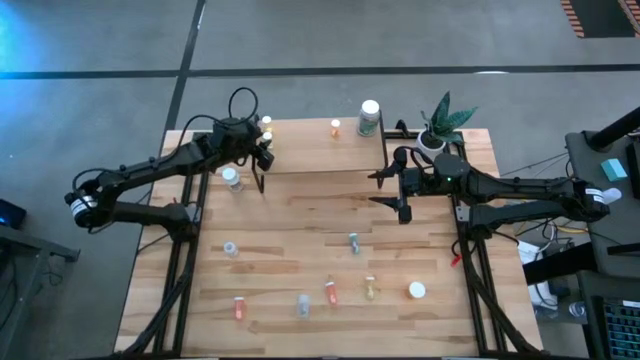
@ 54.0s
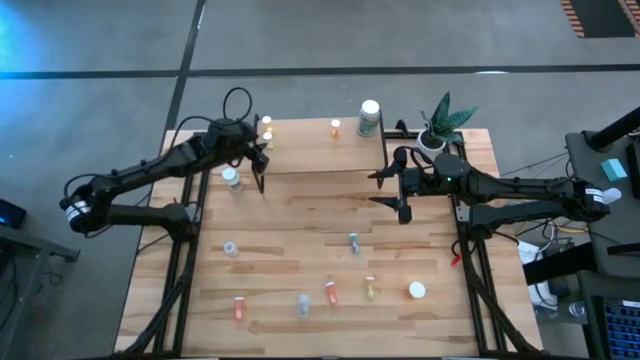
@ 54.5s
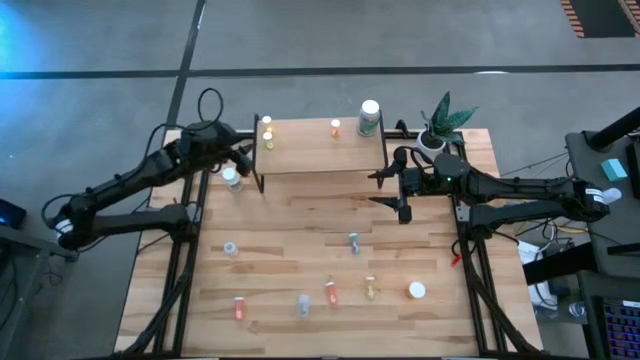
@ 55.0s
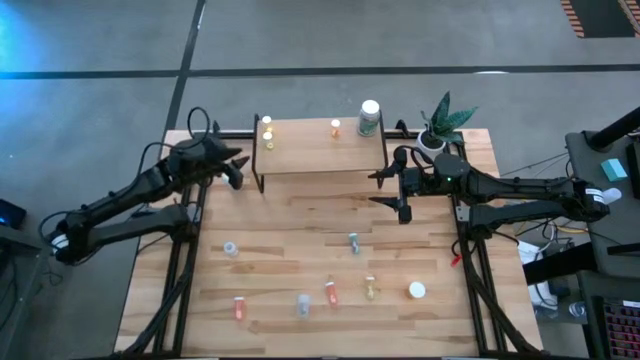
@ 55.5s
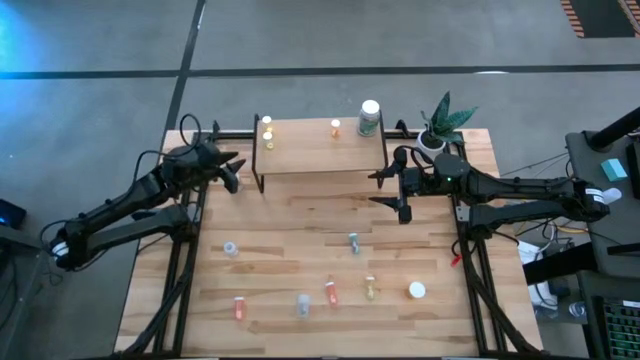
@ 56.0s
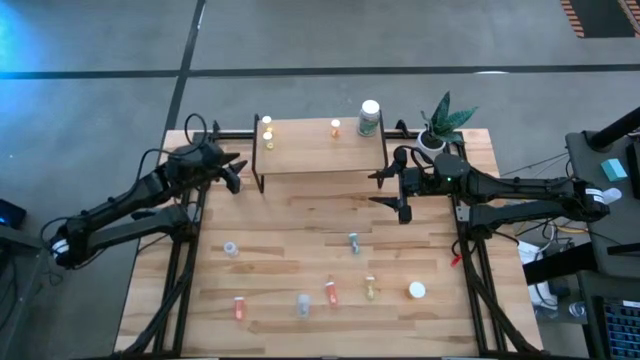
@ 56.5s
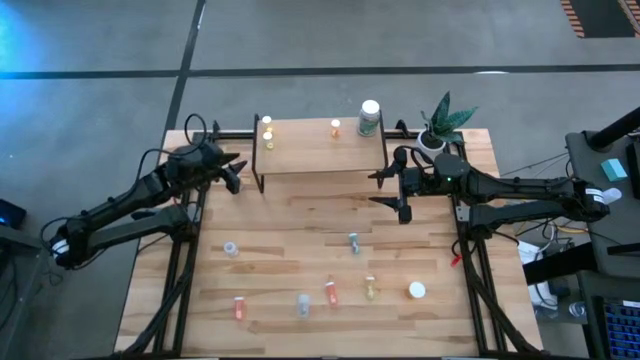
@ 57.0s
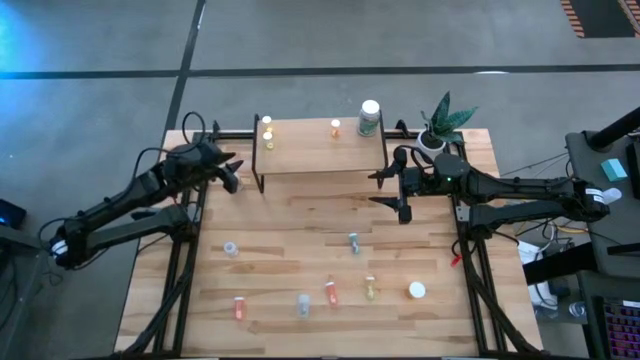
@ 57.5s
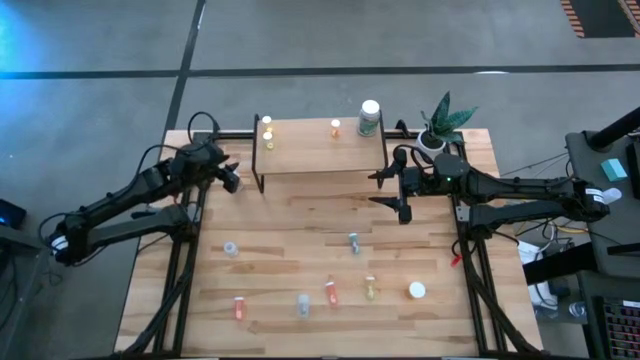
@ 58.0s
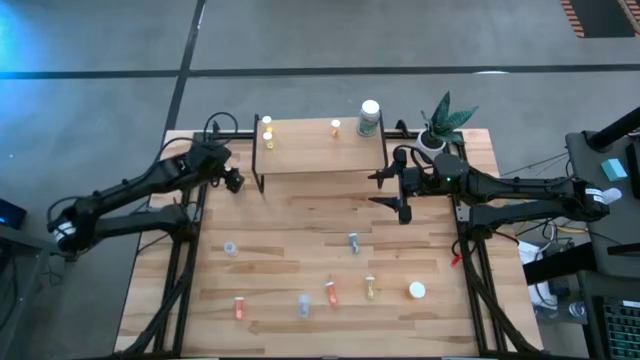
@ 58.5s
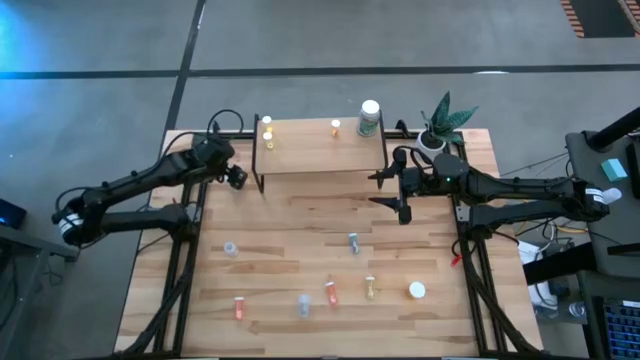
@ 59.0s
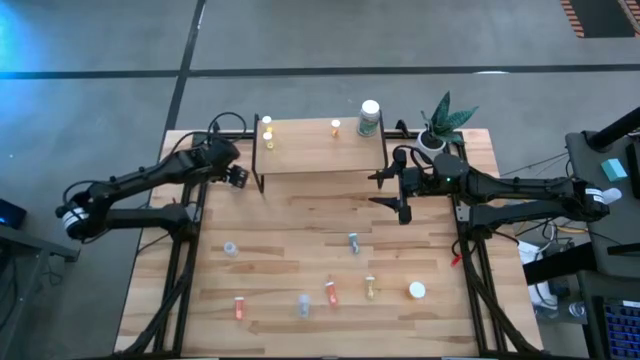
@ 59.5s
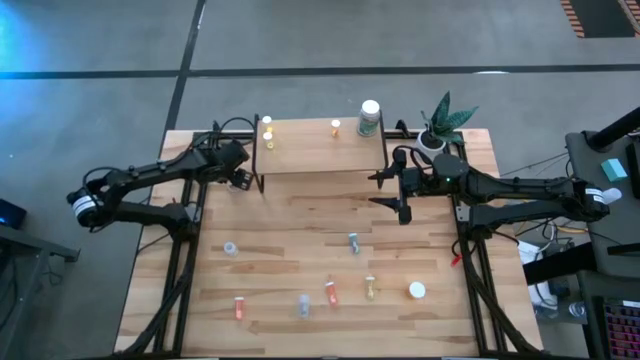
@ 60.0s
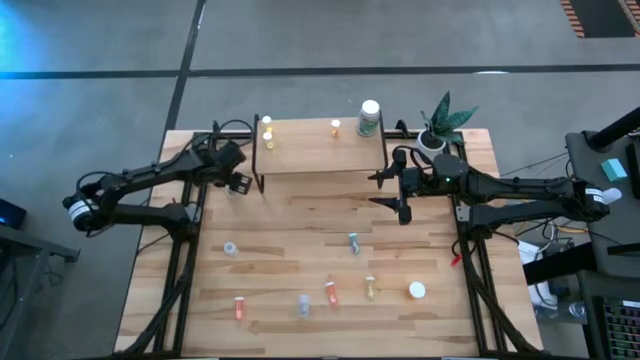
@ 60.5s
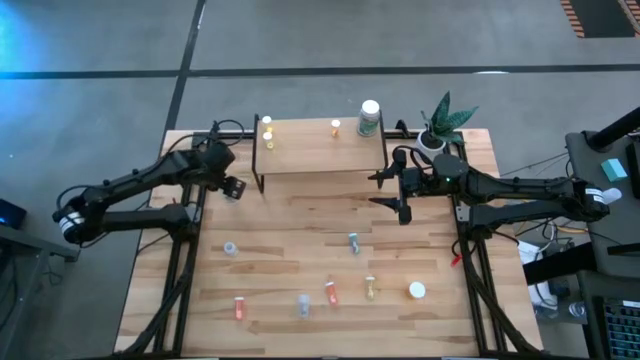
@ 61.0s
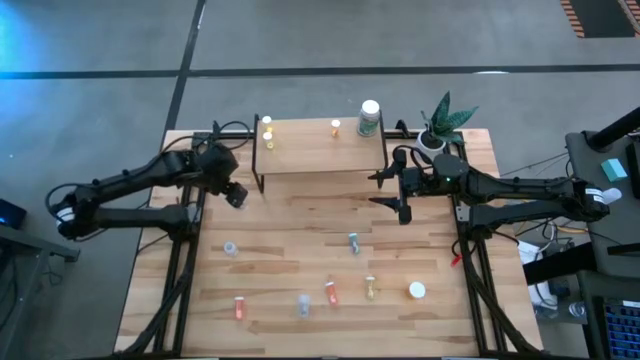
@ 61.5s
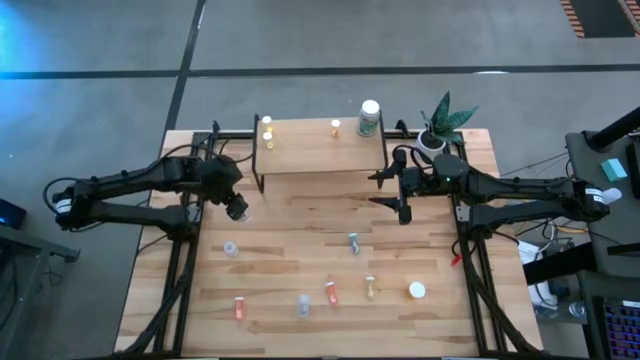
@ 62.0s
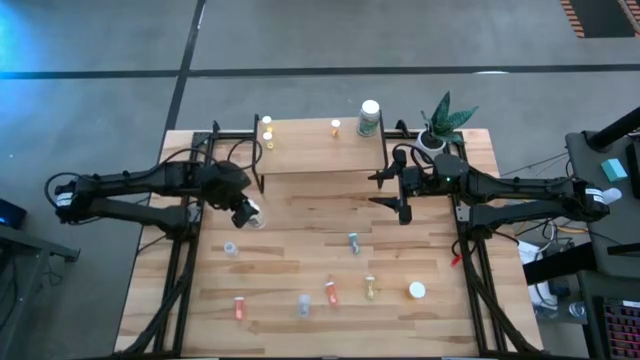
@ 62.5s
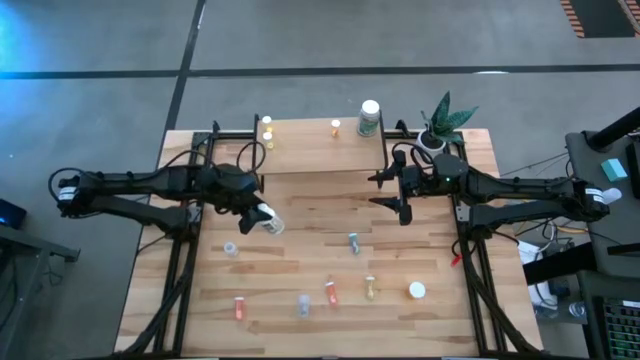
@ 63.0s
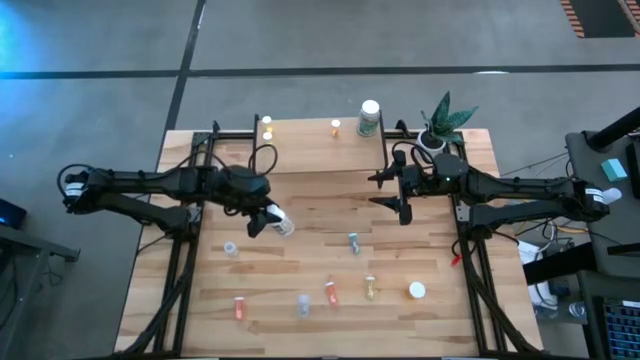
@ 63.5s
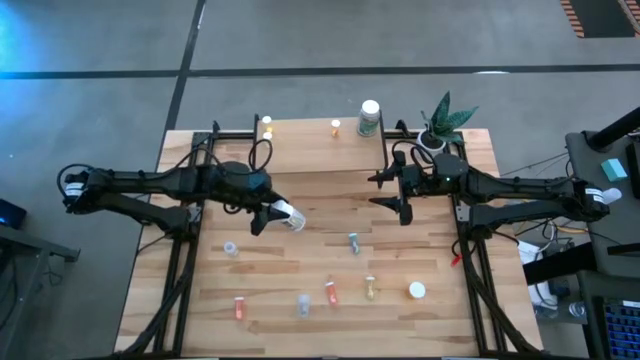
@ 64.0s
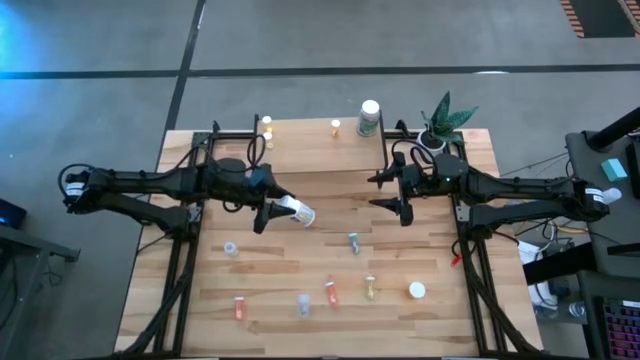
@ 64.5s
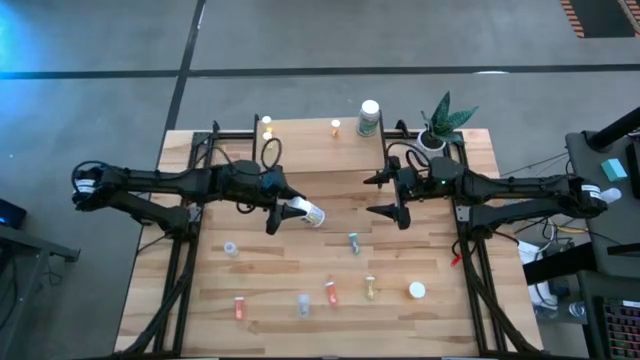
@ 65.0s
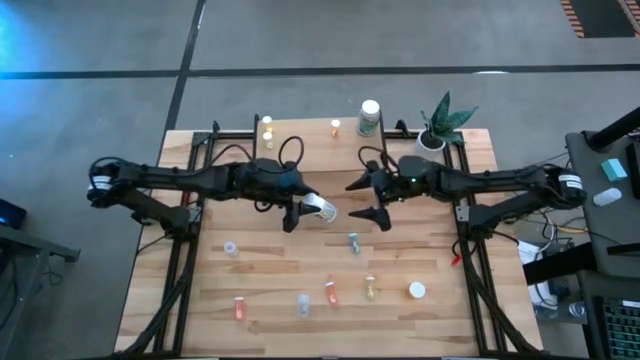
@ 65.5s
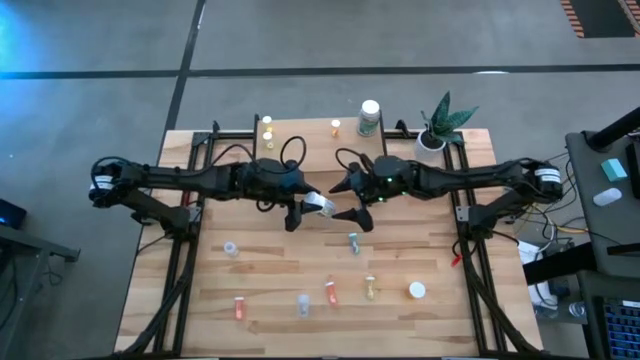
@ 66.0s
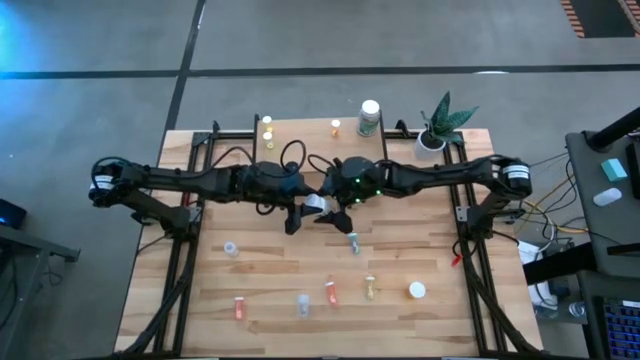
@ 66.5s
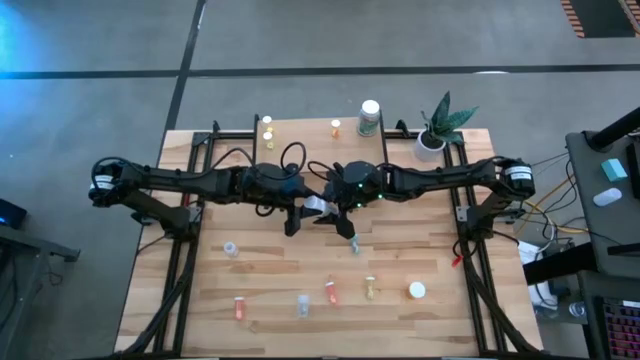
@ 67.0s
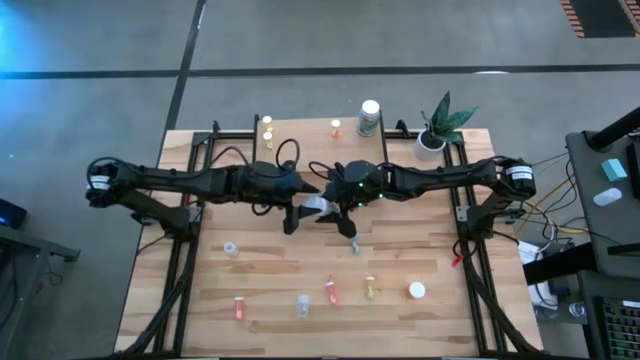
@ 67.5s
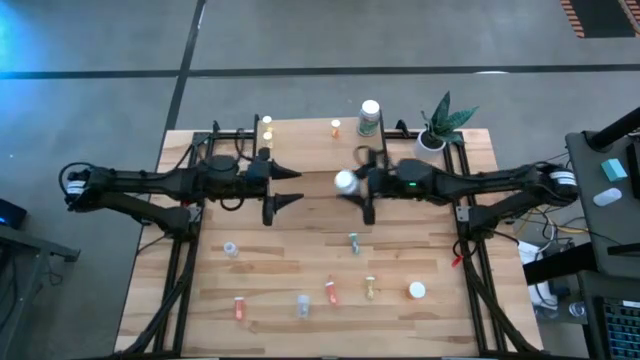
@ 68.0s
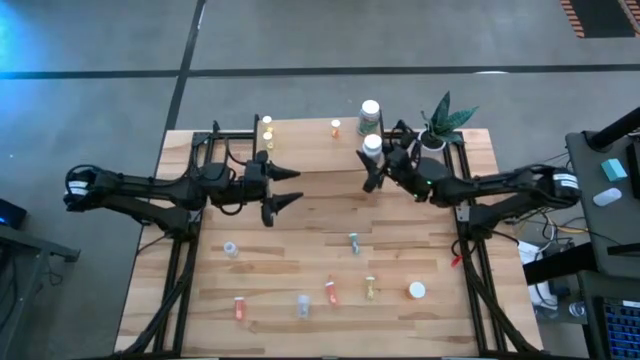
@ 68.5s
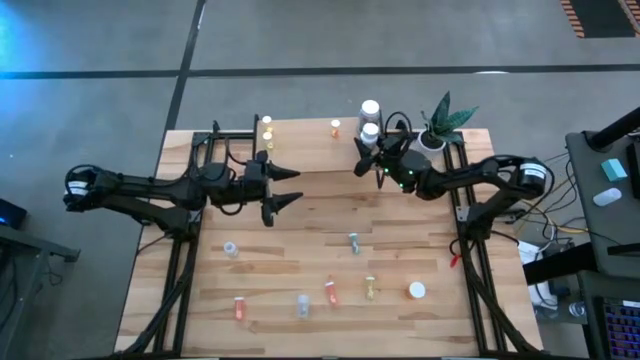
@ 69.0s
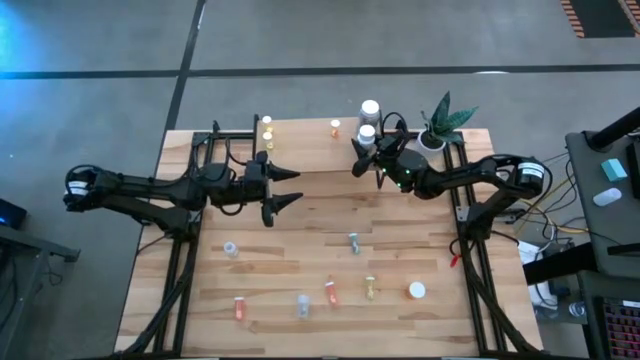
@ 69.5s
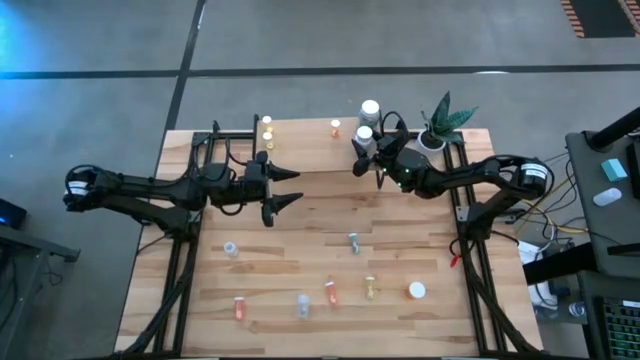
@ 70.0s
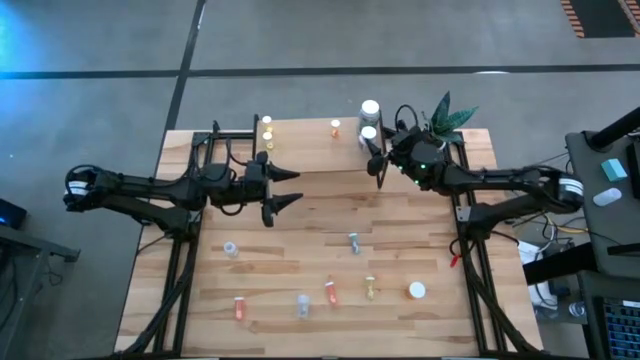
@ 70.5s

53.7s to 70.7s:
Task: Pick and place medicine bottles onto shelf by color
Put the transparent medicine bottle on the shelf

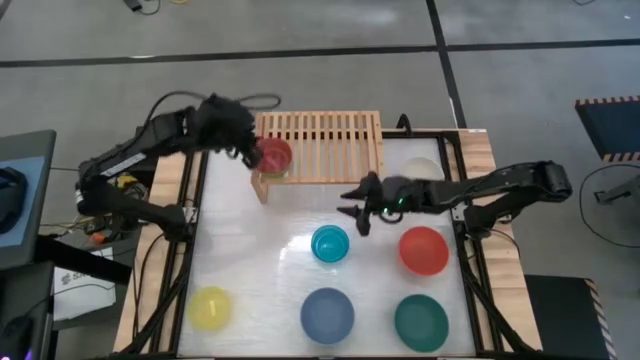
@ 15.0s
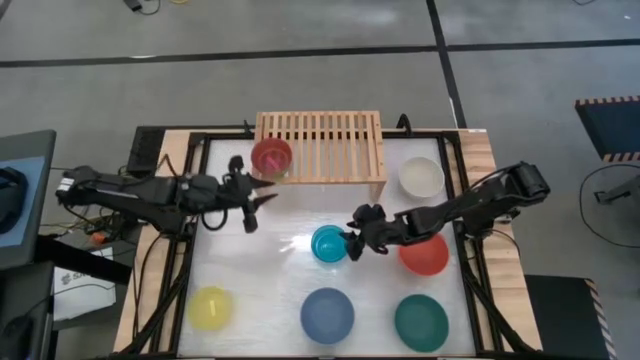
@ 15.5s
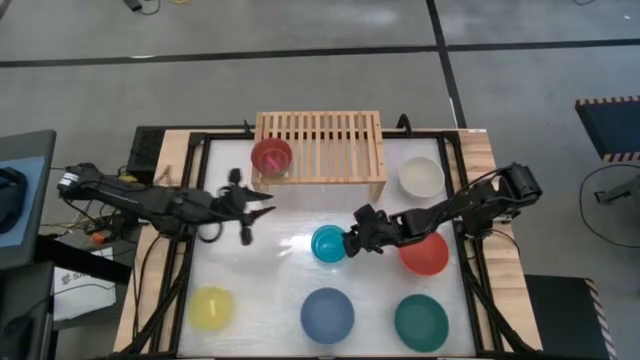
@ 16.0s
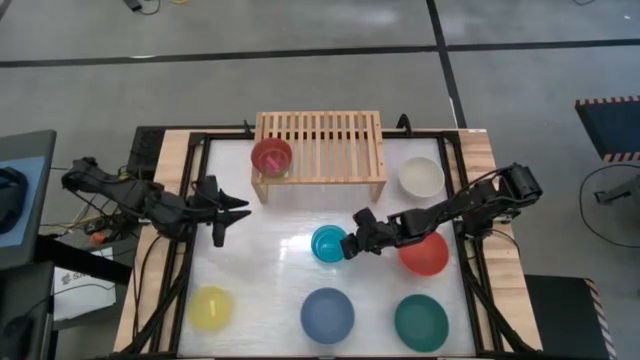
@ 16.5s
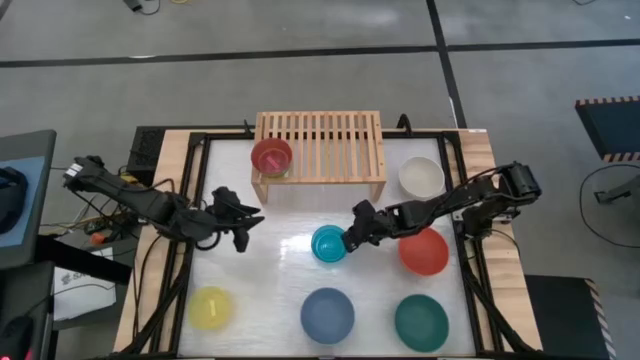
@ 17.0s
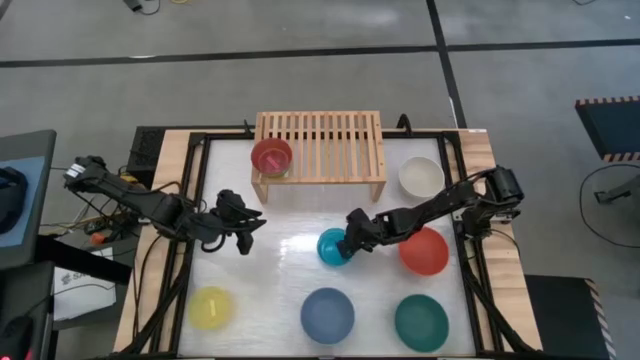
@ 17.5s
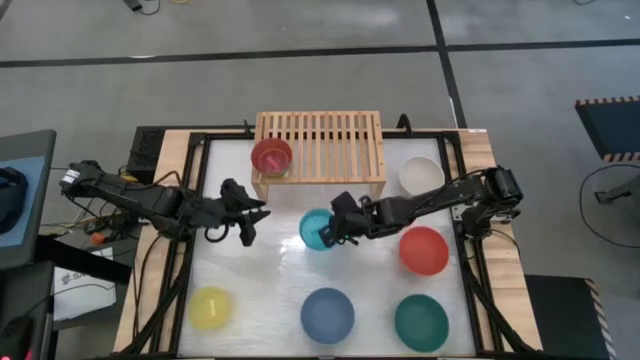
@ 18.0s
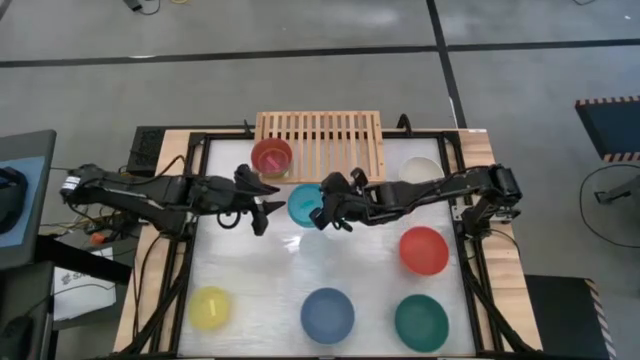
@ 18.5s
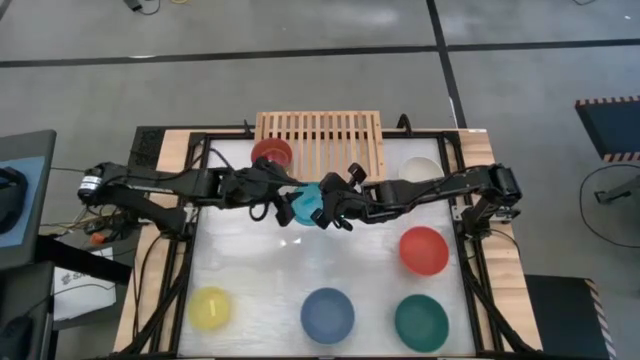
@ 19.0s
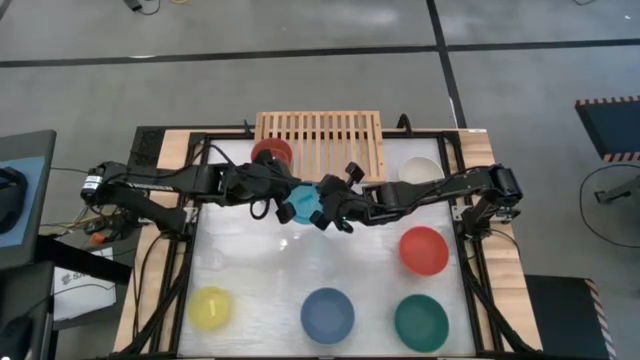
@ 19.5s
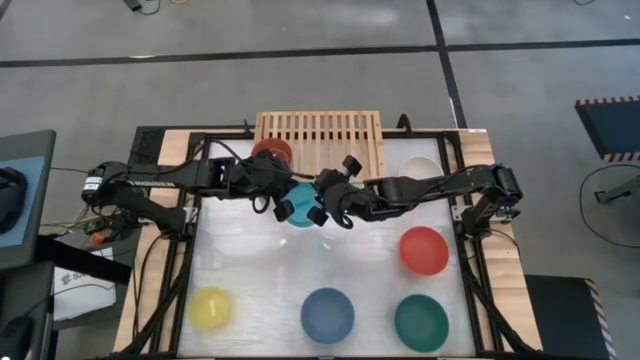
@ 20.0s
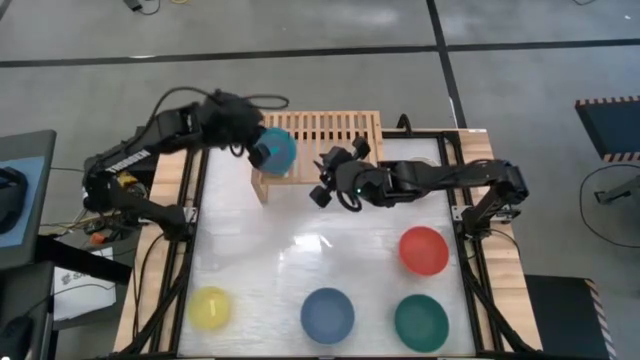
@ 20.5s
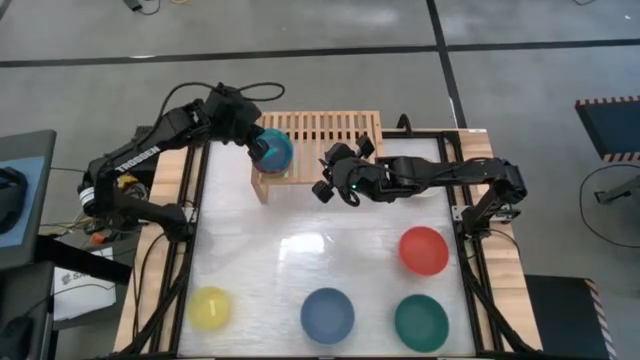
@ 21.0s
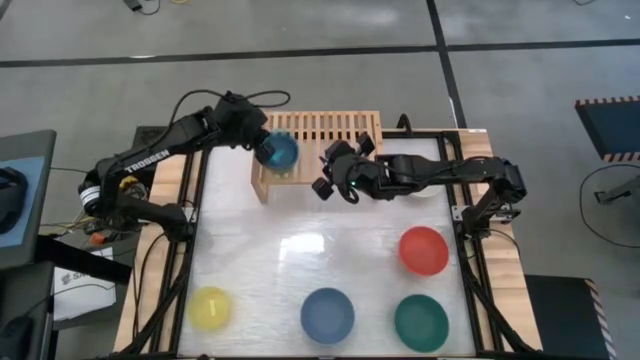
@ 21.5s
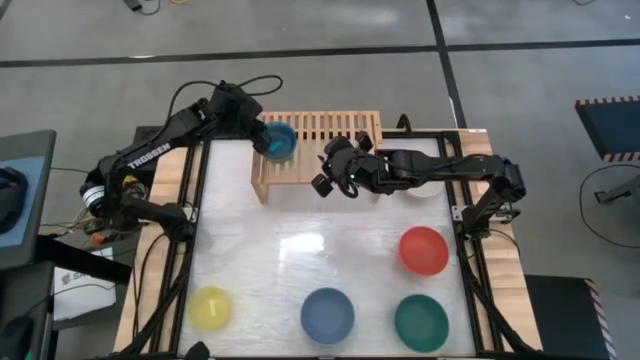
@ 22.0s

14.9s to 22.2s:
Task: Place and stack bowls onto a shelf
Stack the transparent blue bowl on top of the transparent pink bowl
